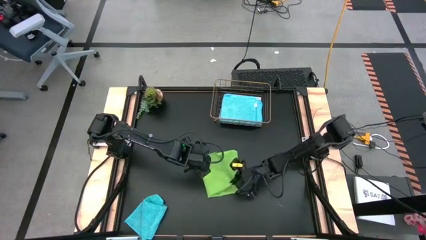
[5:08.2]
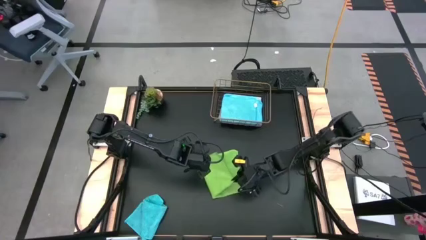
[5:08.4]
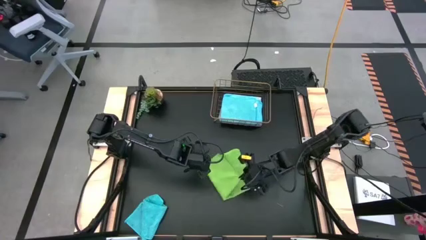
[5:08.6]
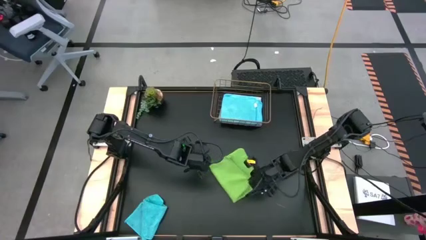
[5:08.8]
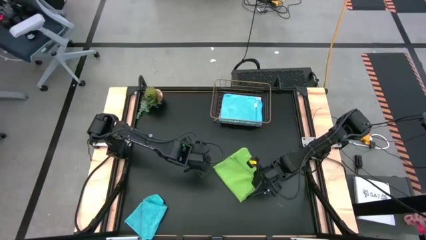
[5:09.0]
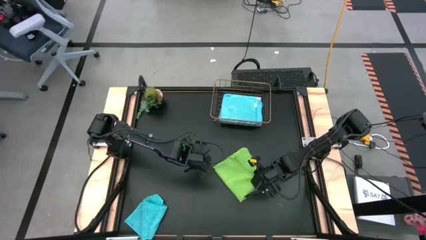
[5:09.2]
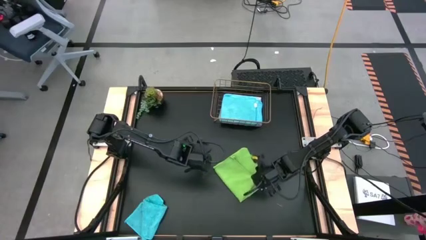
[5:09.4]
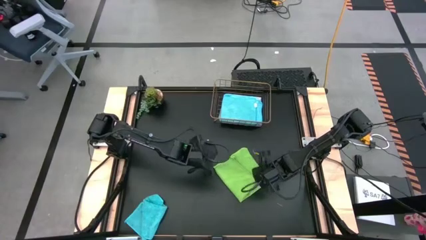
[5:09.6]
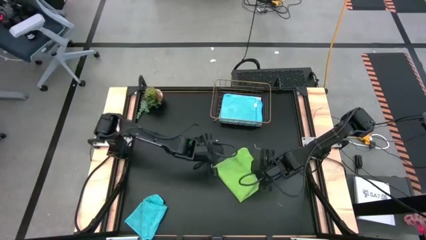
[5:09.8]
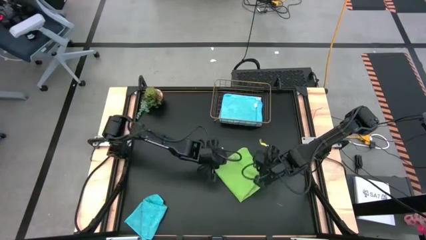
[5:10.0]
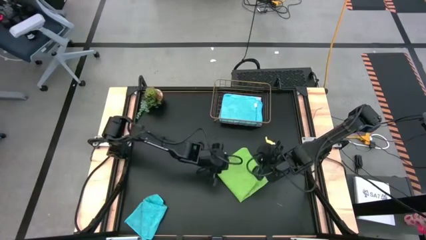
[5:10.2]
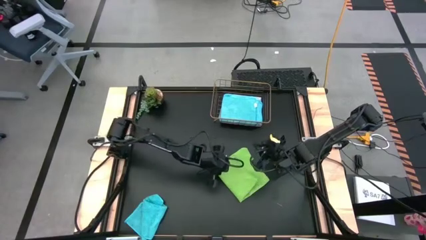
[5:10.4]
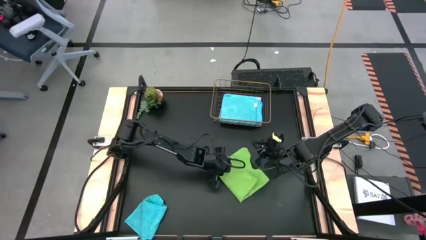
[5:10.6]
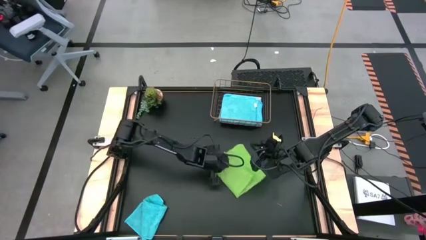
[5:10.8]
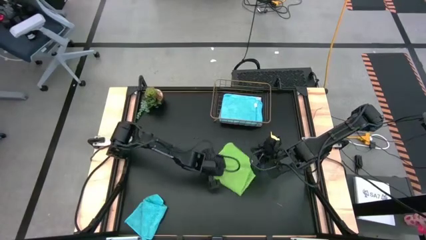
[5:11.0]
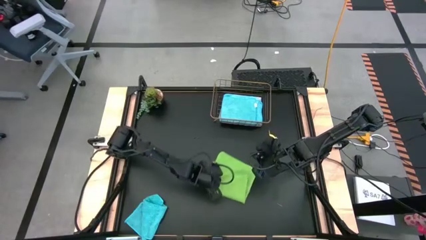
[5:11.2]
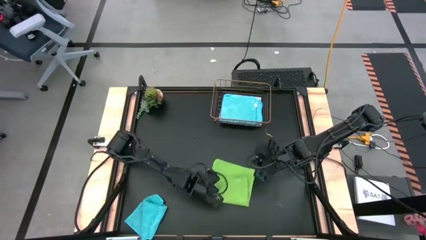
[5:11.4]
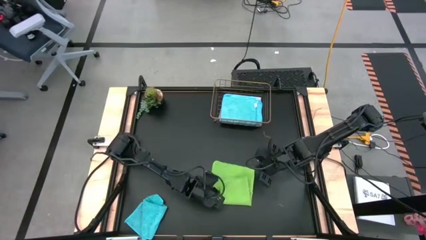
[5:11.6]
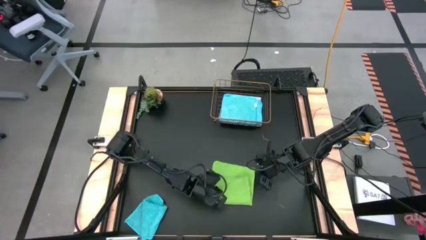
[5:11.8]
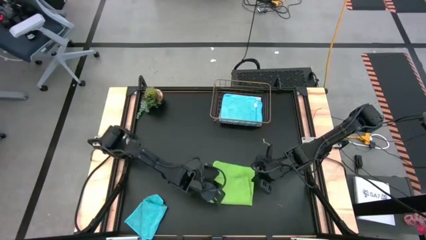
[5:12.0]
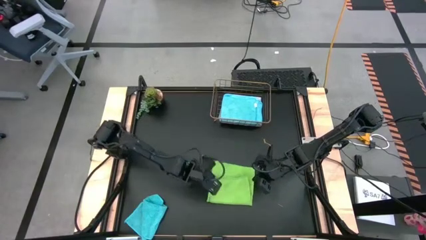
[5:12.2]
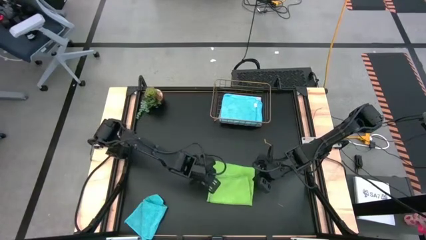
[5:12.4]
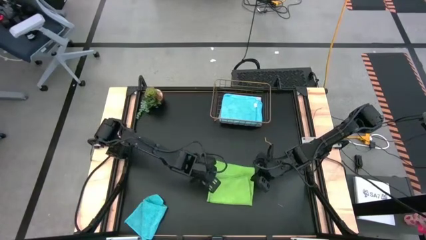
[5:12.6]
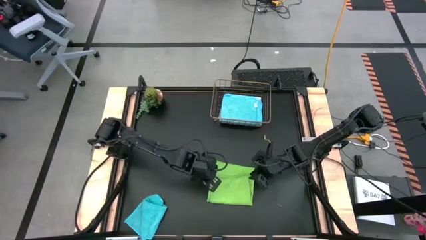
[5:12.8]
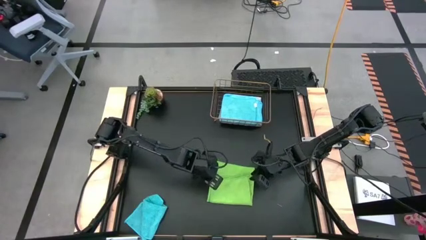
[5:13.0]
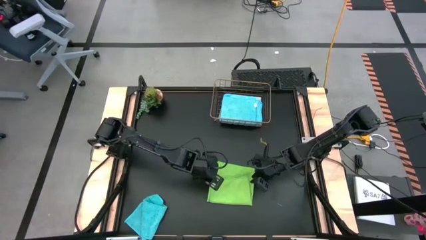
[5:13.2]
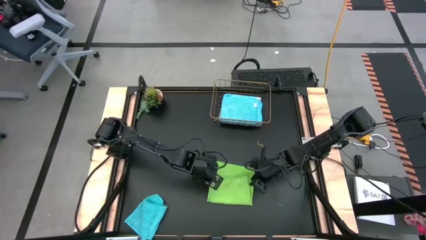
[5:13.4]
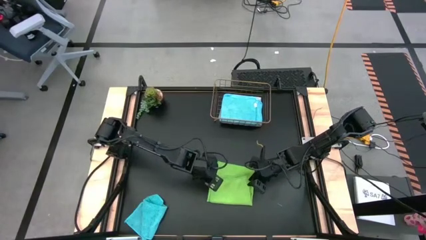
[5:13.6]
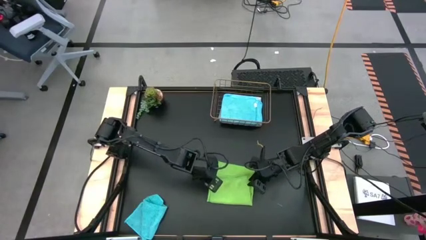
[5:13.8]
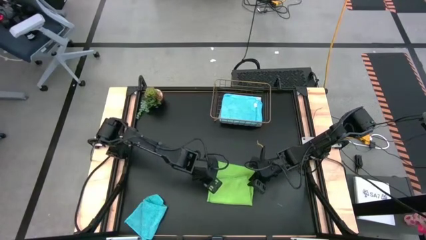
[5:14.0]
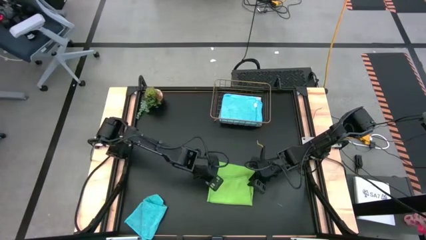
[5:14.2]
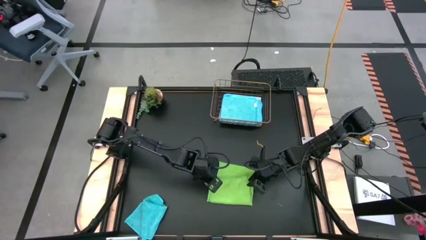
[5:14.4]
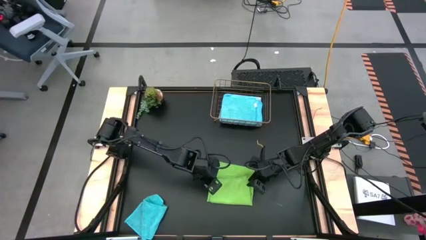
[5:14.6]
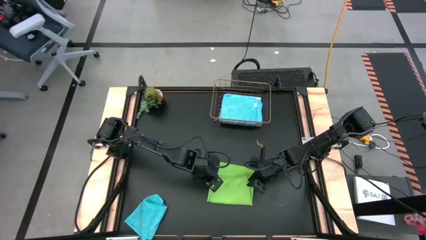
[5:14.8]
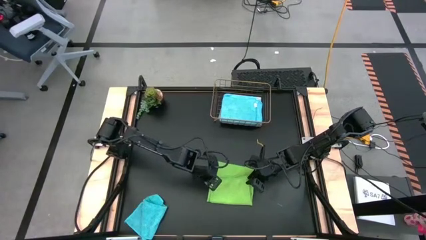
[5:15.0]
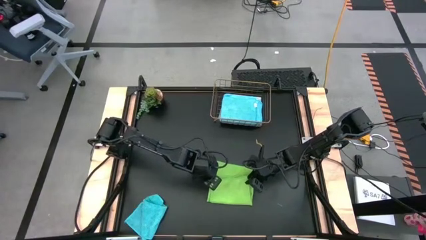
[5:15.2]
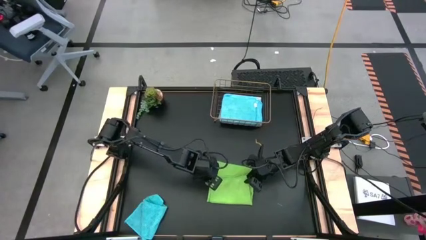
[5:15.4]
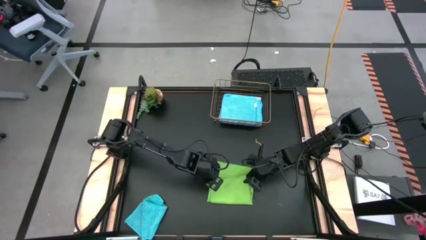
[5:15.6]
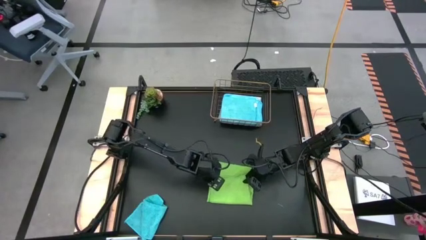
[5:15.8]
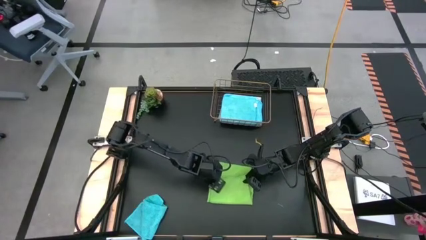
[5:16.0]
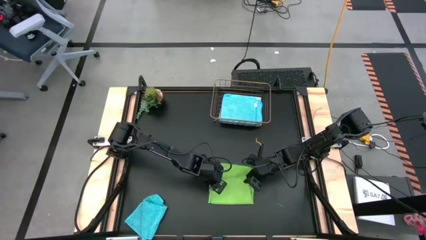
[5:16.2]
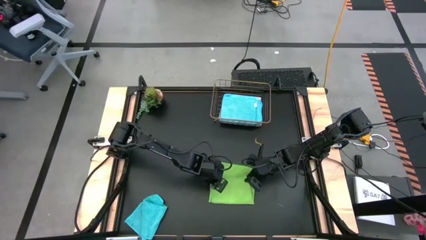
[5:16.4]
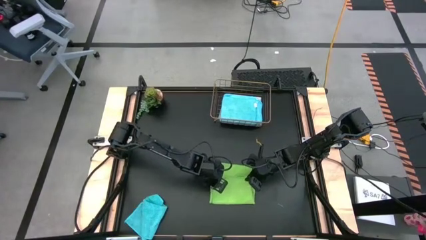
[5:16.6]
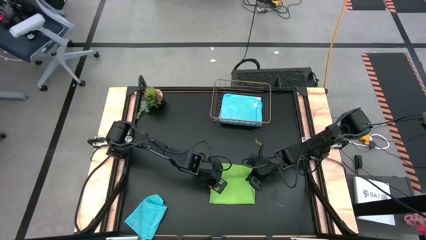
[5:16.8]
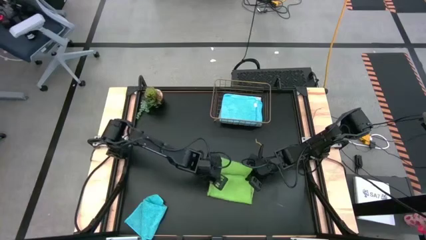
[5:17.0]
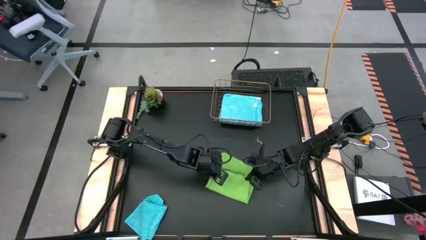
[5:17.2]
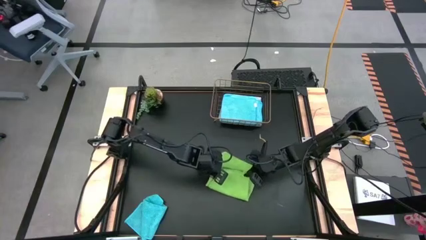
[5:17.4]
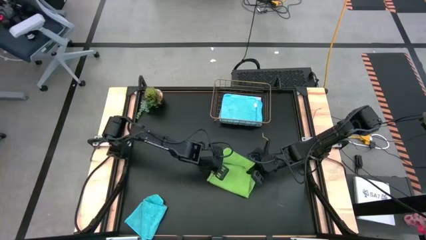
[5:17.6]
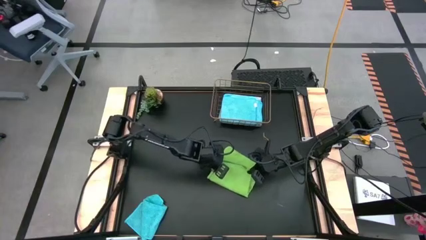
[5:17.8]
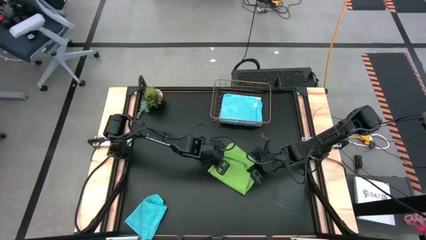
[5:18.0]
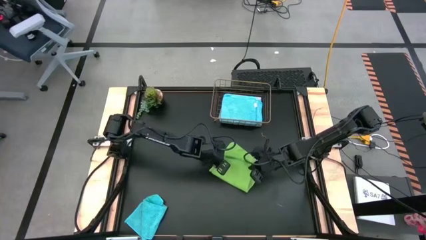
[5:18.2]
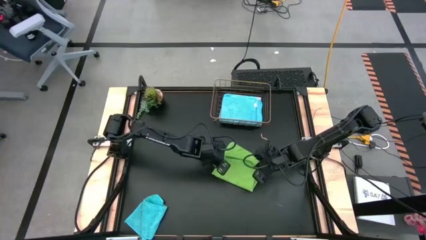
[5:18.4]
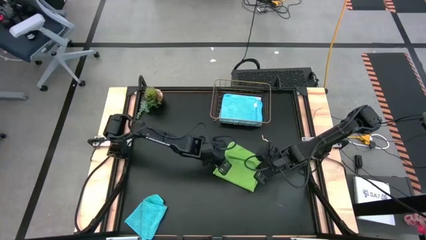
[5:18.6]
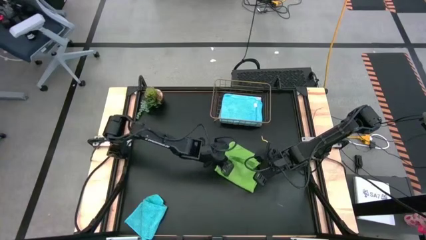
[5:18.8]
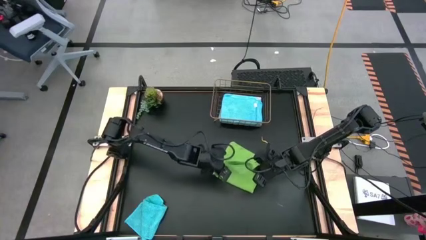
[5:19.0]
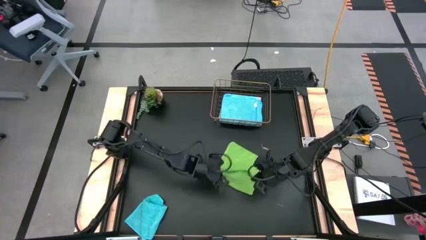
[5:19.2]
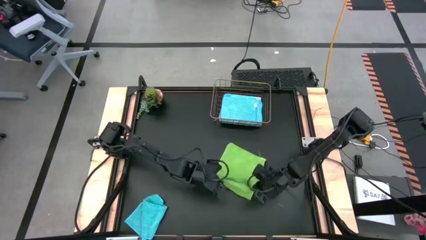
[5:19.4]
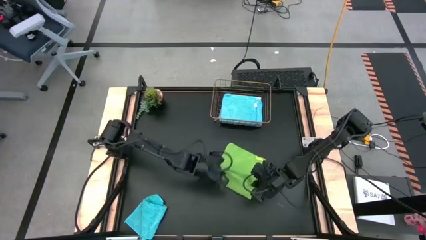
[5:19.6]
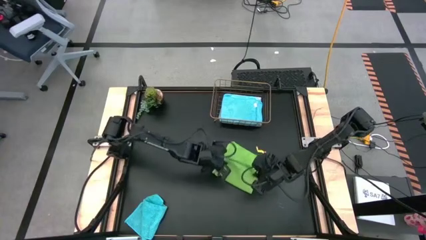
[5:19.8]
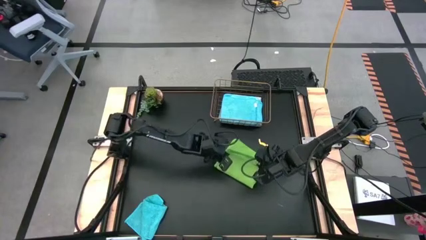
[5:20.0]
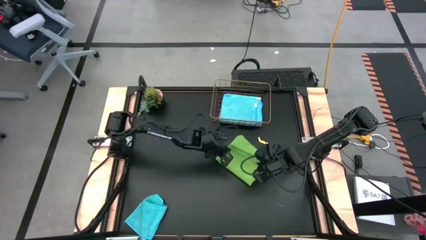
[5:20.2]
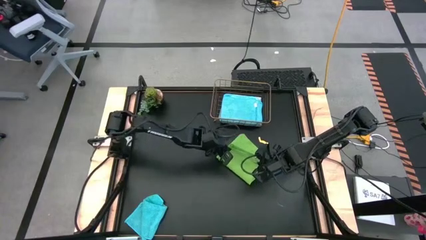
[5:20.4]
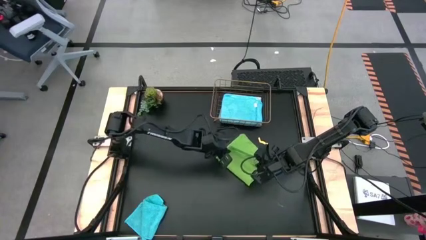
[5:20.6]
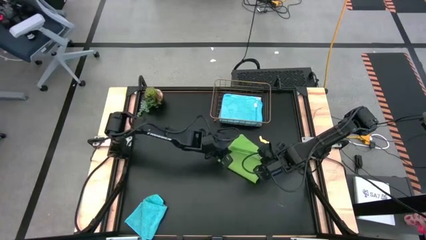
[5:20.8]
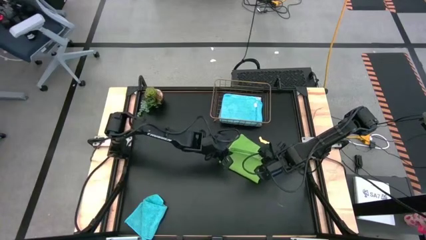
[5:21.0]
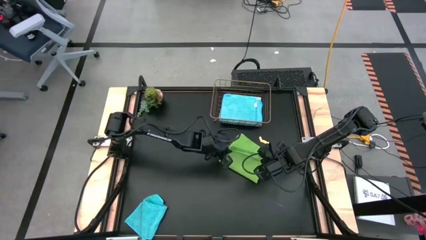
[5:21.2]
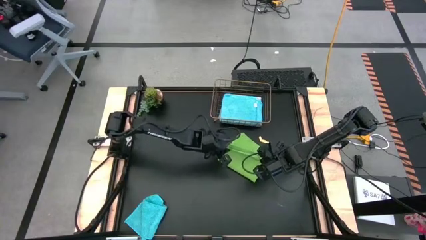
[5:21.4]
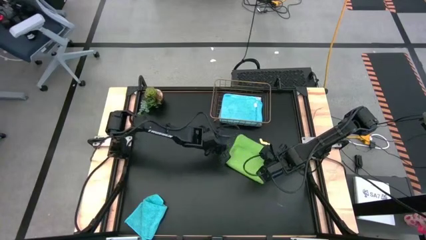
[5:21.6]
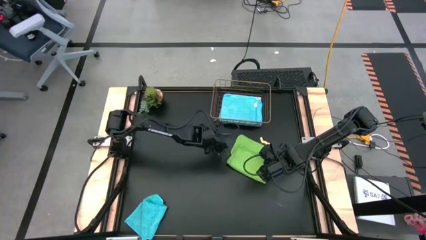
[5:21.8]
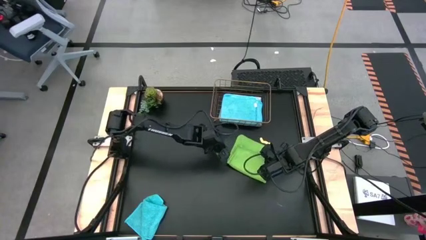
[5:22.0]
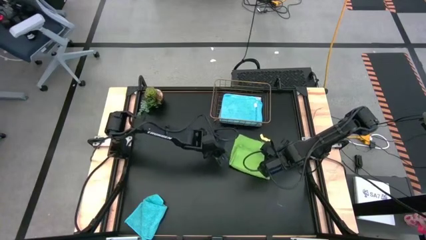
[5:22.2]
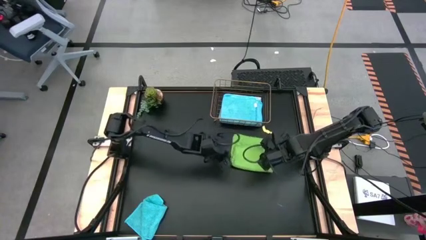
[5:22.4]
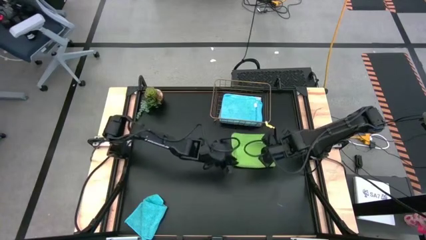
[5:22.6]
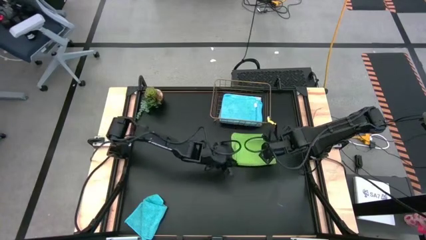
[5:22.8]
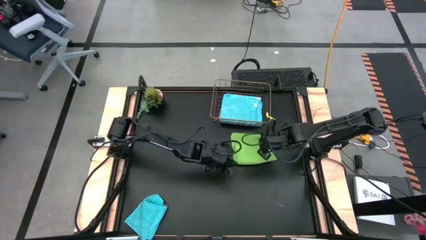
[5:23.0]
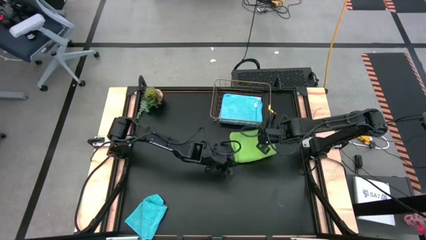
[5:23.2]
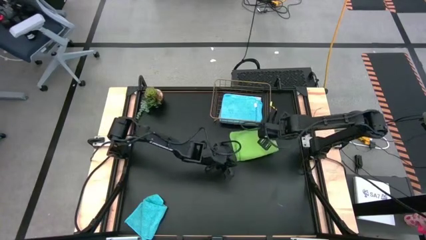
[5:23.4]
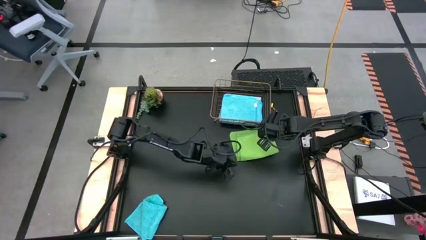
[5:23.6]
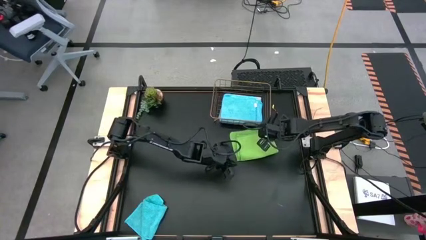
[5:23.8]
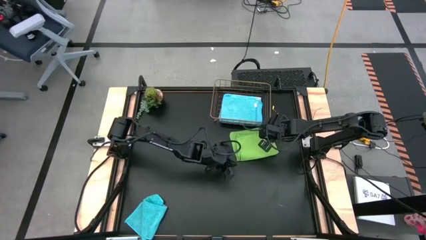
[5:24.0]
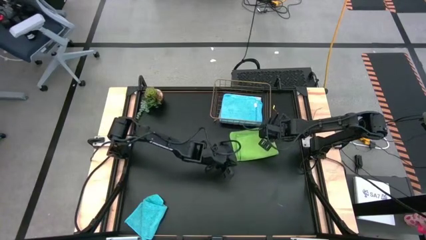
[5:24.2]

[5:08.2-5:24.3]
Task: Fold microfiber towels
Fold the green towel
